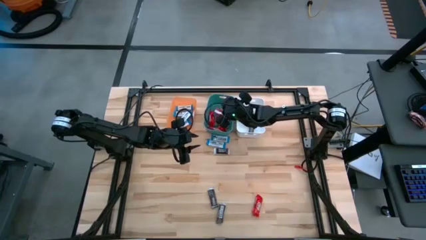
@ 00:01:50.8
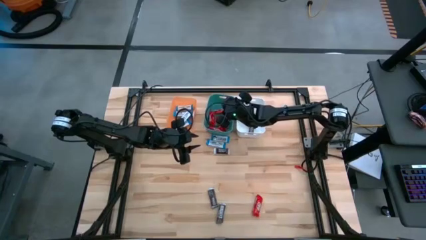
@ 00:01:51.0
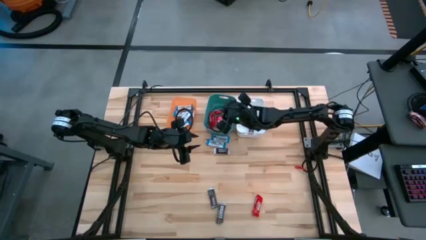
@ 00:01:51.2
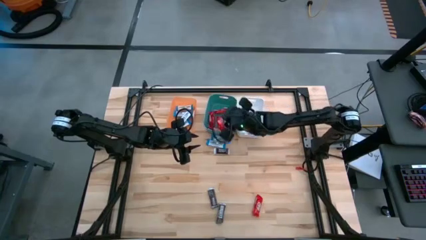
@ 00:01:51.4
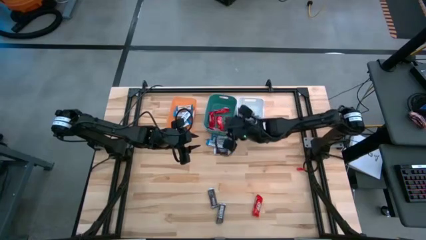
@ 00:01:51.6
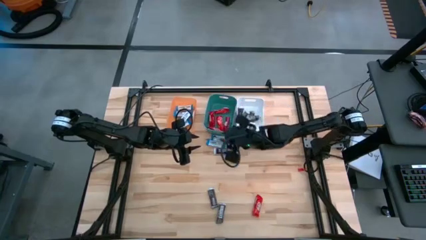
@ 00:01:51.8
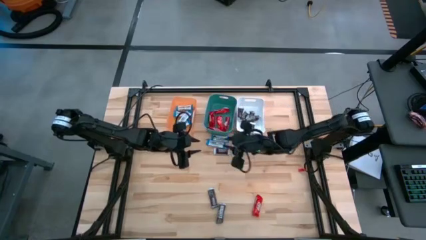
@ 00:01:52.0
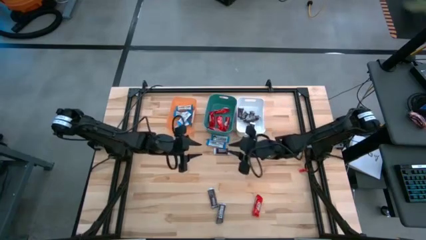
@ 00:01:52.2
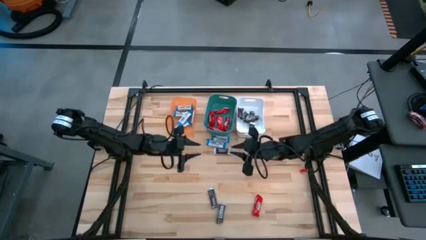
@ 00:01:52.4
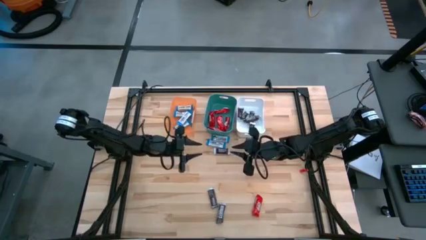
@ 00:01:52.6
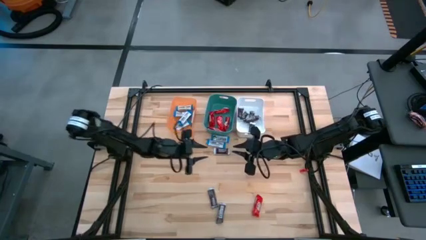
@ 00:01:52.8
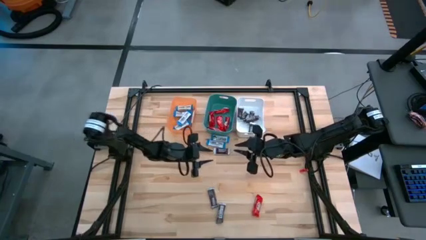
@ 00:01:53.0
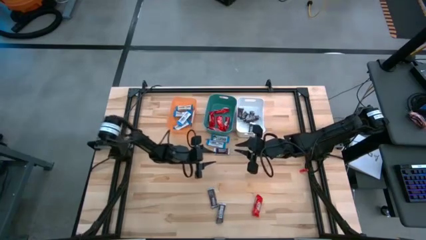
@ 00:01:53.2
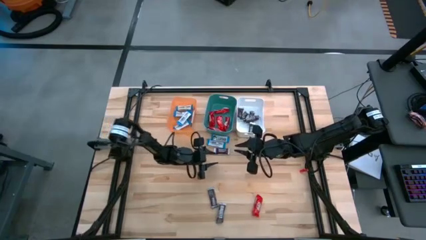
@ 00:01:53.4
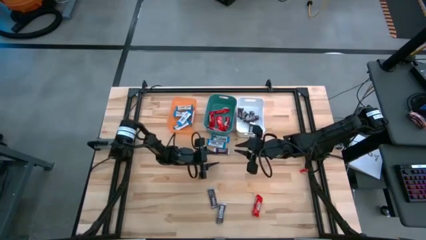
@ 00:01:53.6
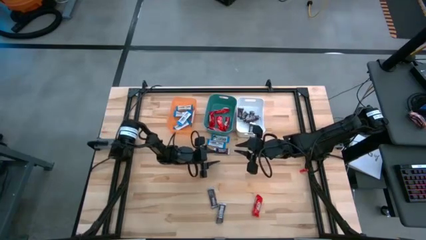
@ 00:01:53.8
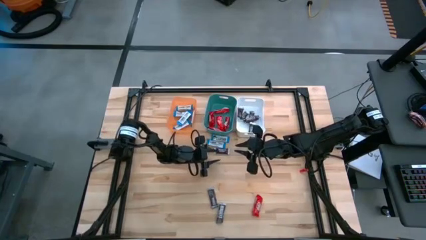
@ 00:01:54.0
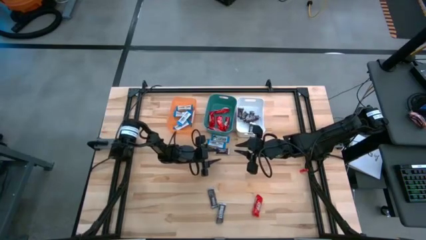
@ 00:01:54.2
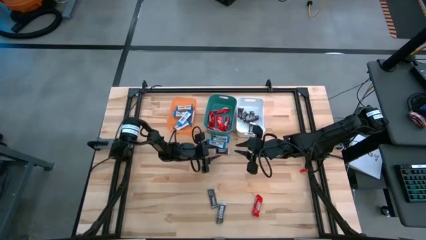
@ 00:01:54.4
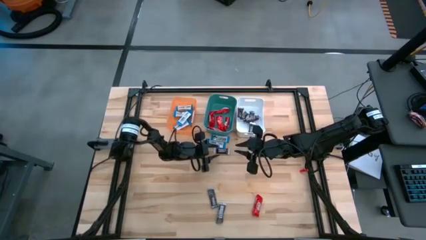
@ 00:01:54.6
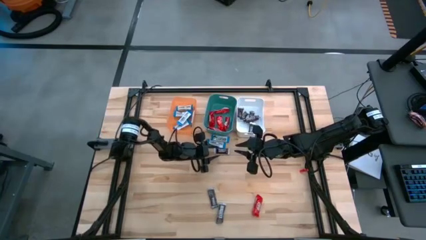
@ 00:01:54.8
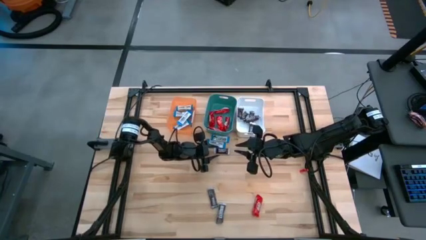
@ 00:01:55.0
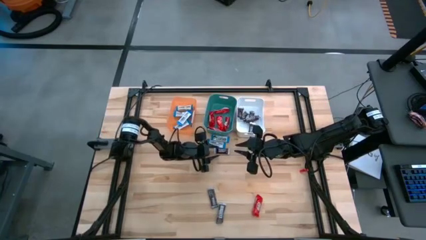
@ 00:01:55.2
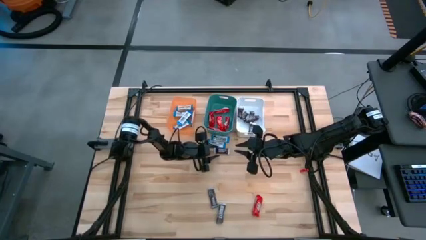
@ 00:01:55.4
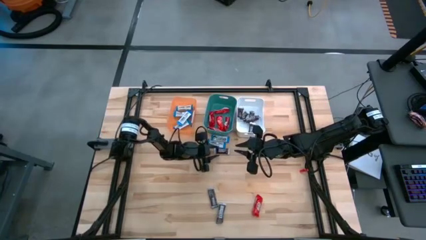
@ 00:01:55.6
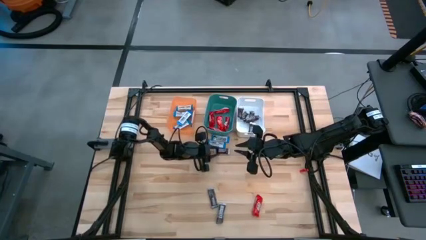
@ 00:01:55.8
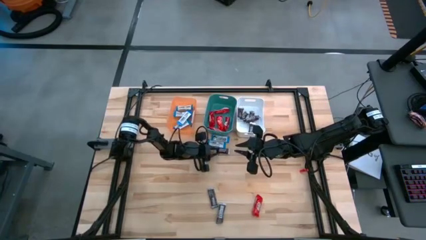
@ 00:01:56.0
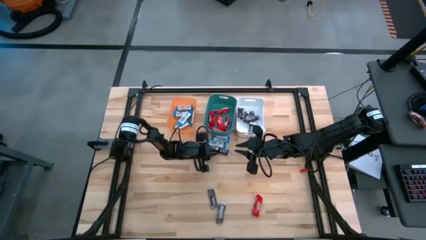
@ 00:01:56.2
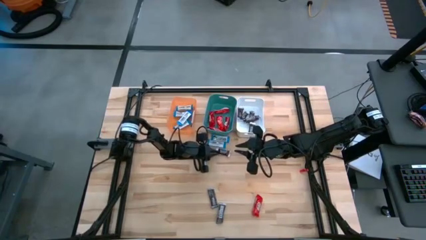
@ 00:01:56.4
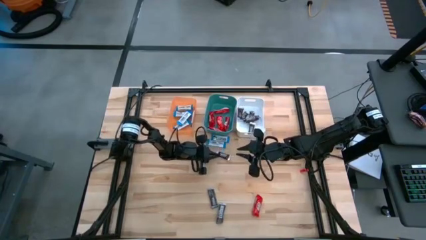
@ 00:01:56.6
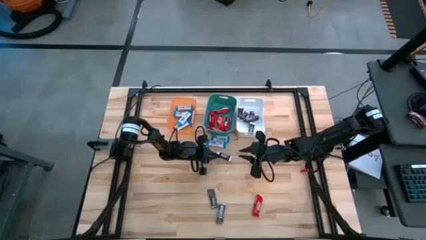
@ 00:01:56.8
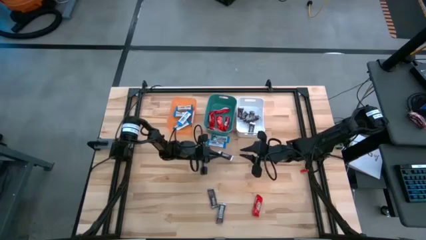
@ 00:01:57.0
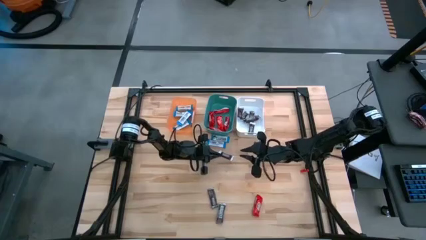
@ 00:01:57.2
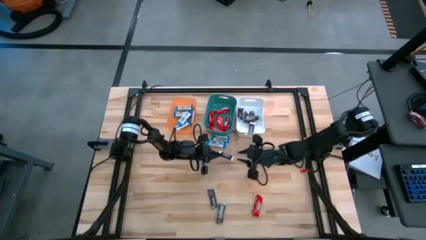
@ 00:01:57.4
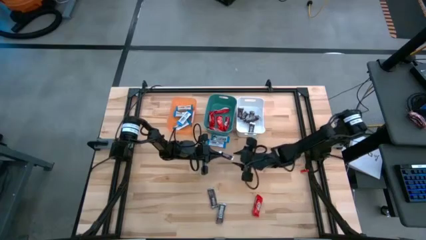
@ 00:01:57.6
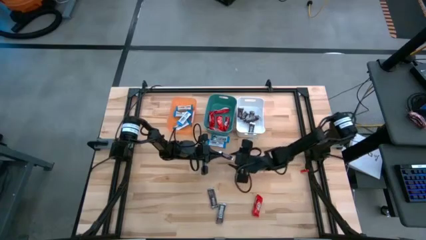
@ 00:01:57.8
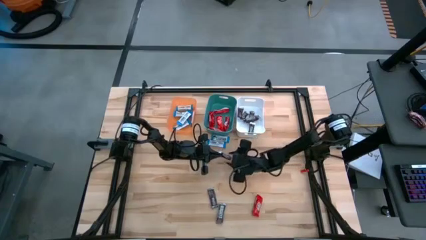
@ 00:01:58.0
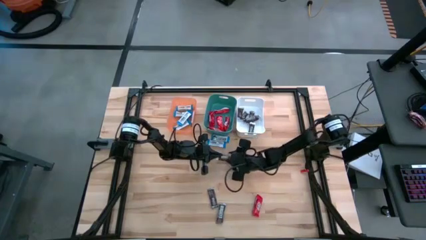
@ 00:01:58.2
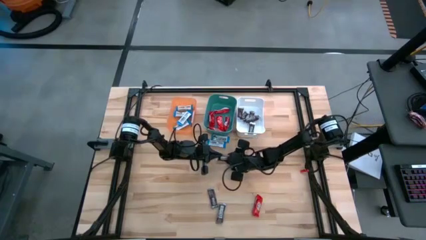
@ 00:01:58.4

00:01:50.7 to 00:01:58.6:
Task: Organize candy in baskets
Put the brown chocolate into the white bin

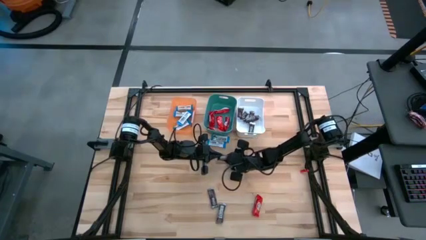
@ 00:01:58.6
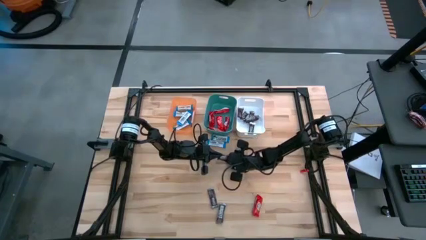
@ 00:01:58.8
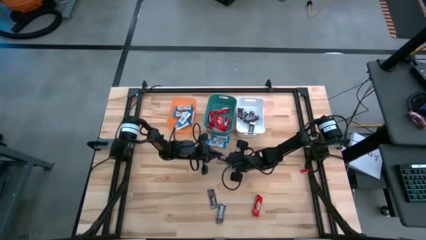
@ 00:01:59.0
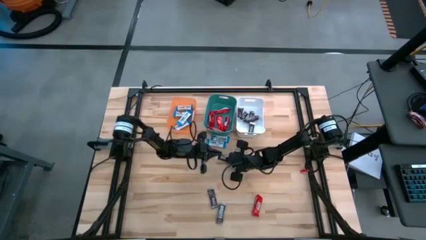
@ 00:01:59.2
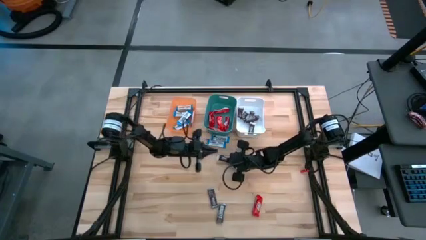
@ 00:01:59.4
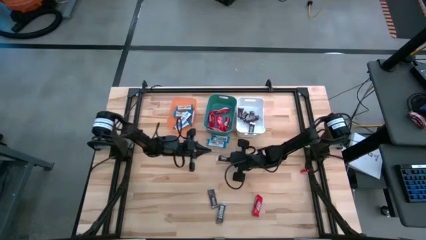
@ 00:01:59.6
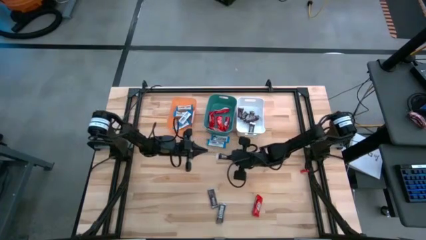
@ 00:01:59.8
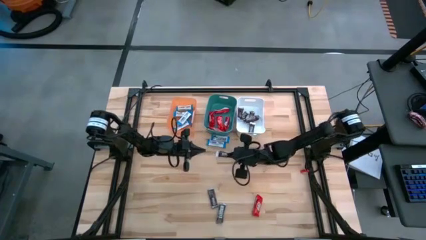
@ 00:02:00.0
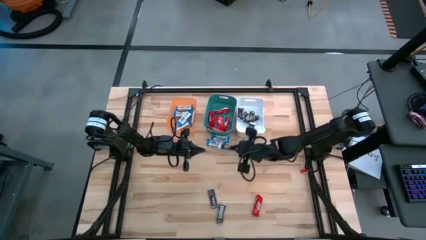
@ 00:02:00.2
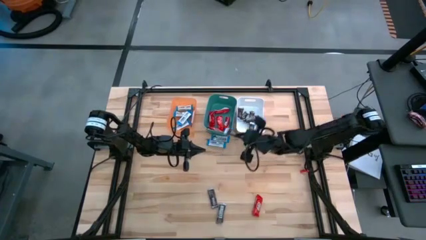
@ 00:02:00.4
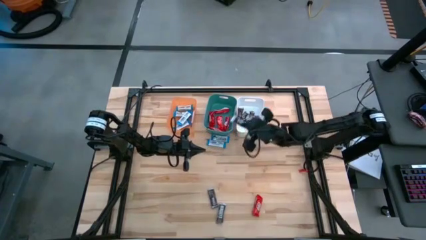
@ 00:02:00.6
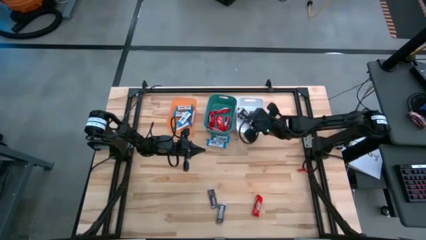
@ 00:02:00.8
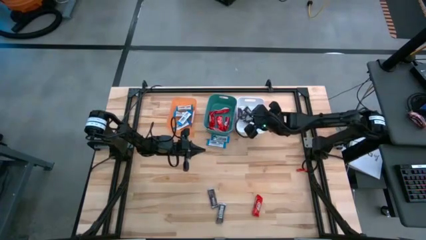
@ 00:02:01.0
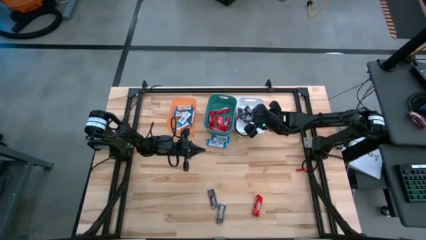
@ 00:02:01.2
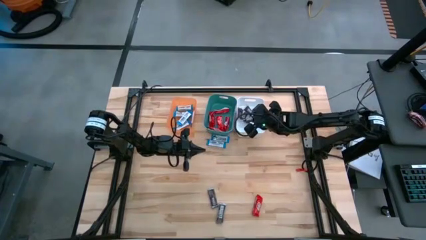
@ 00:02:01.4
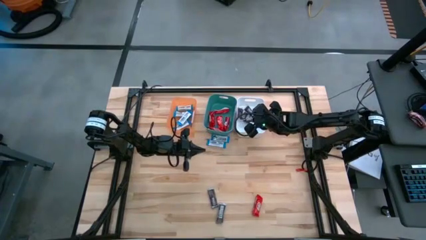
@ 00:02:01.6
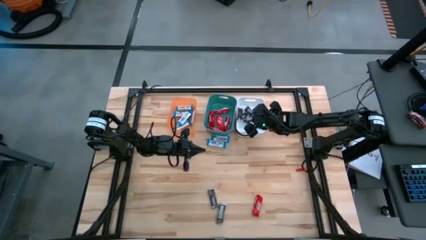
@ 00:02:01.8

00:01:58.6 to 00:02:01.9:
Put the brown chocolate into the white bin

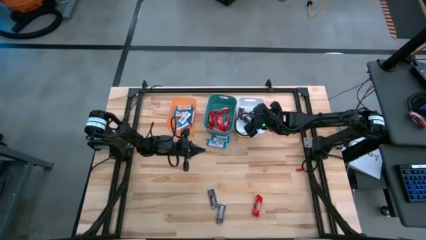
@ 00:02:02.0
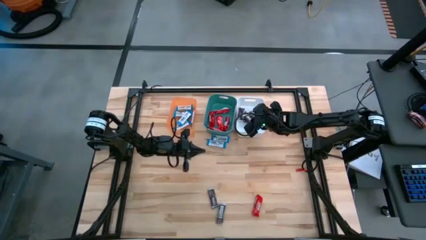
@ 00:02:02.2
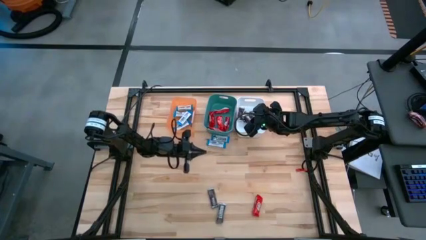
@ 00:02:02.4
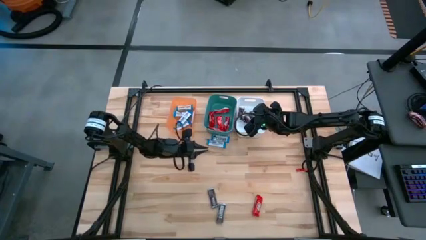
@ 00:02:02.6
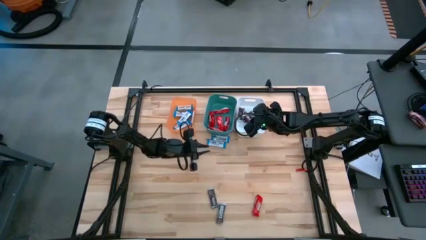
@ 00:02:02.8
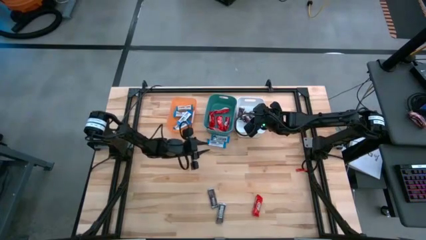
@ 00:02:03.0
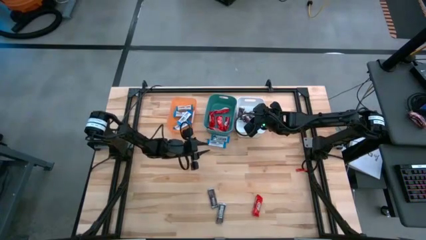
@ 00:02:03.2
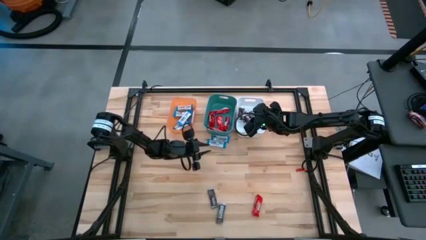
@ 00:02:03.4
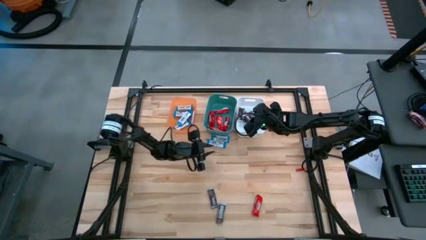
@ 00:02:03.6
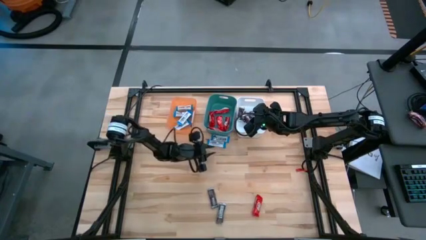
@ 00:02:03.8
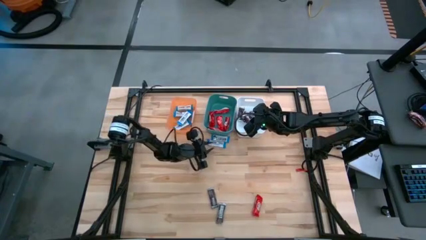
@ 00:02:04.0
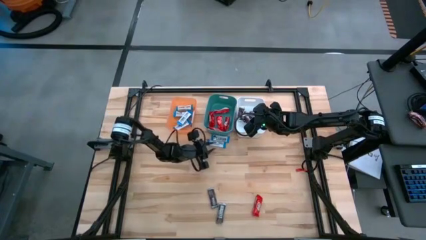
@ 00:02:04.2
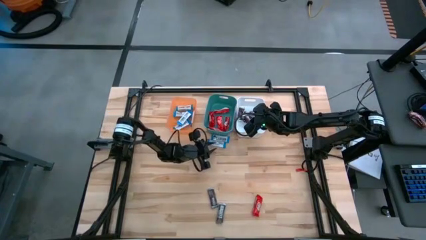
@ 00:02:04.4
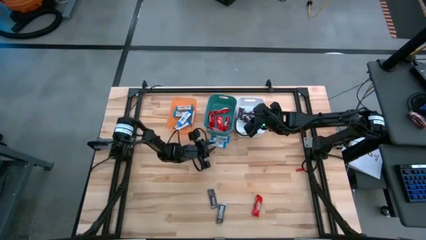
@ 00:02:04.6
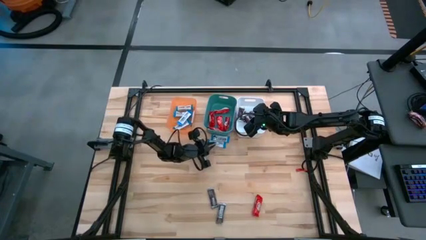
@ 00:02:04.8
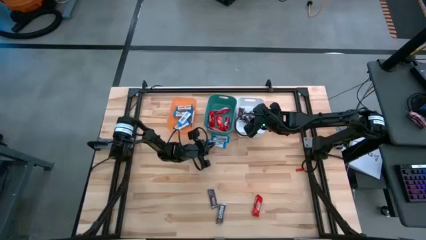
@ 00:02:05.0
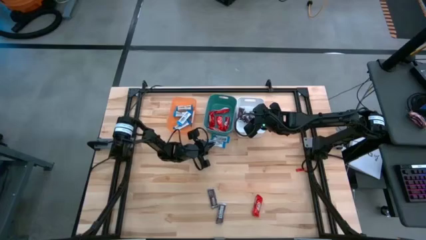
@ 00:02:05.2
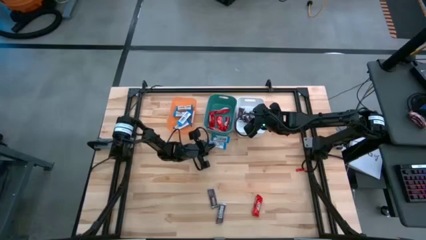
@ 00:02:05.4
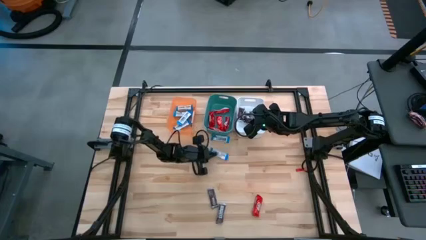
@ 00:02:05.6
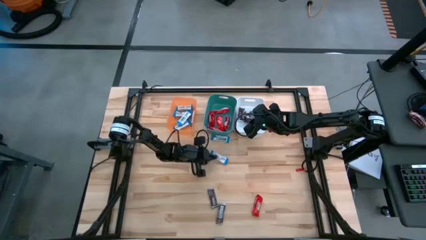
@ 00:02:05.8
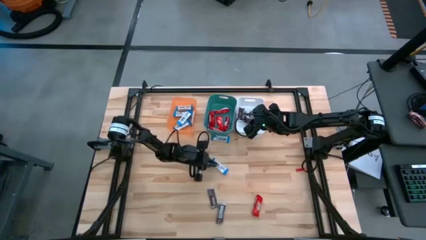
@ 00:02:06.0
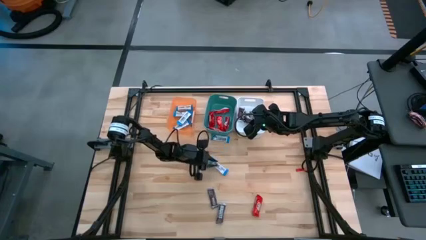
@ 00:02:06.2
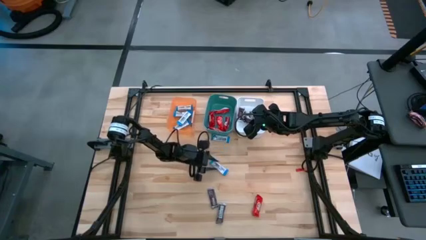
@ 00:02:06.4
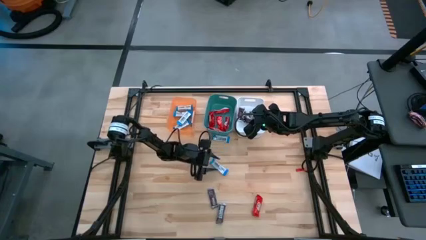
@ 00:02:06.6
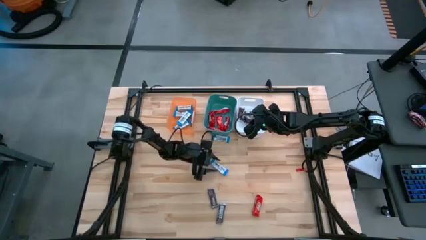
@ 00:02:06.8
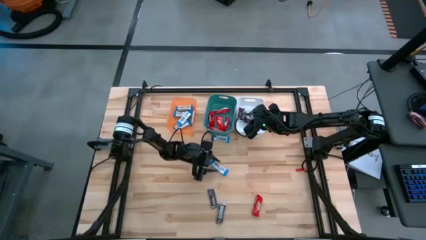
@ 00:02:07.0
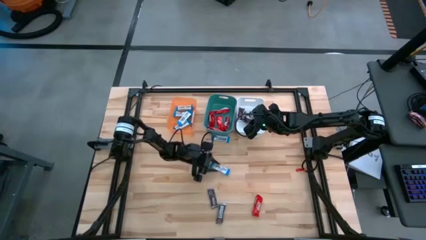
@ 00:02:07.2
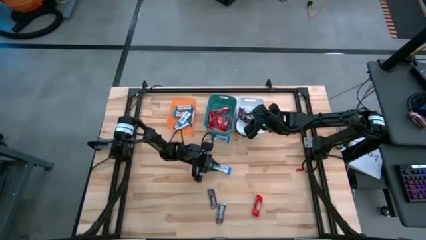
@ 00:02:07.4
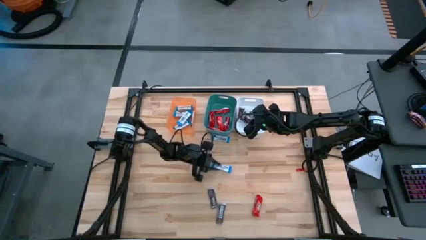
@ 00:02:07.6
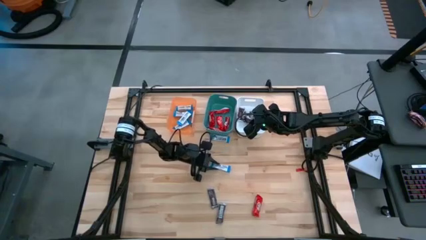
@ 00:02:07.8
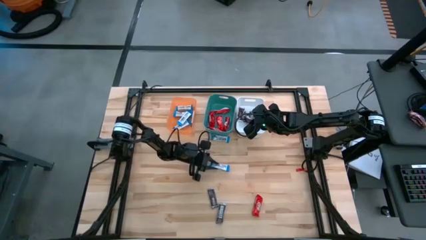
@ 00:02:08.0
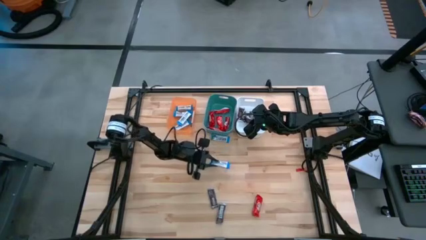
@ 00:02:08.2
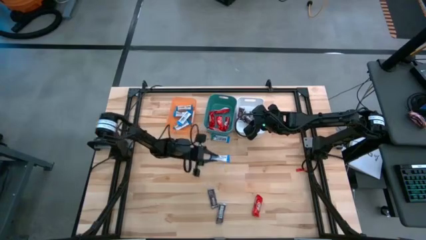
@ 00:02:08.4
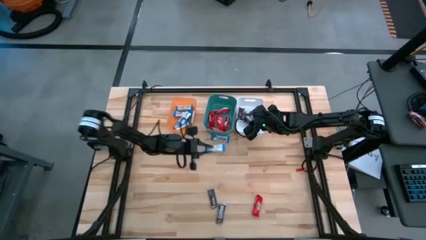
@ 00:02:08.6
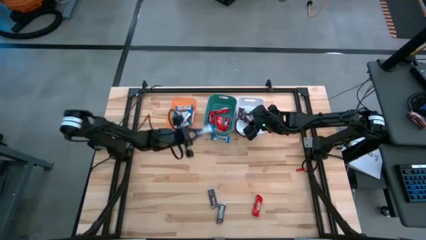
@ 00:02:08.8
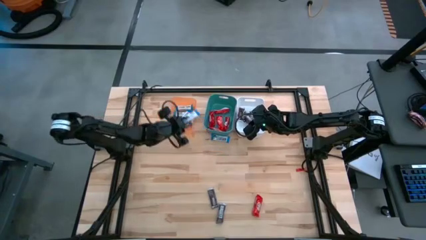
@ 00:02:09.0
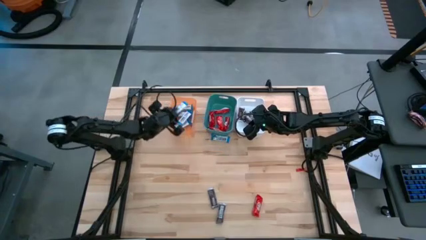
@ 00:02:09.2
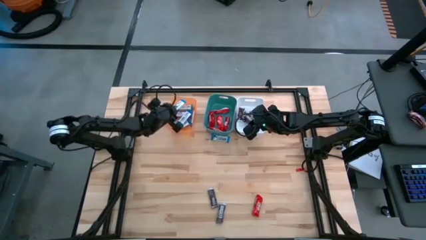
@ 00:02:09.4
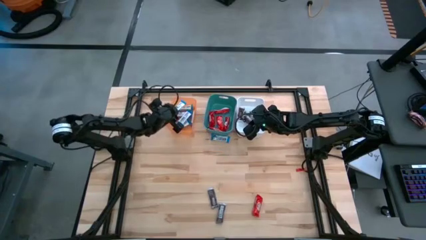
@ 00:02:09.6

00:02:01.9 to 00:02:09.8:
Put the white chocolate into the orange bin
